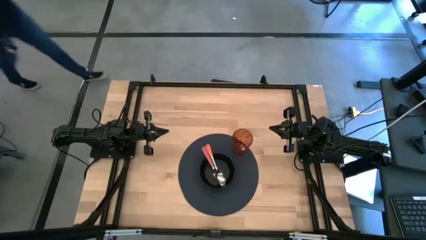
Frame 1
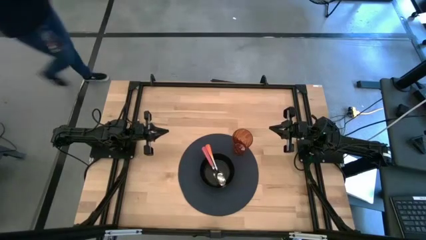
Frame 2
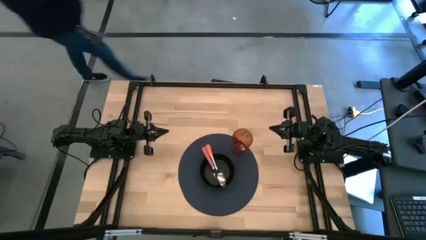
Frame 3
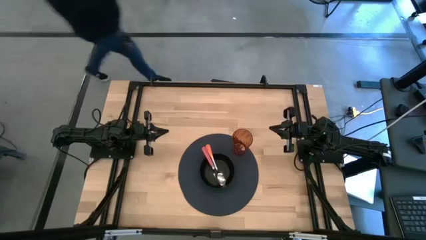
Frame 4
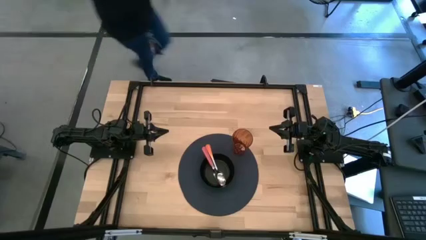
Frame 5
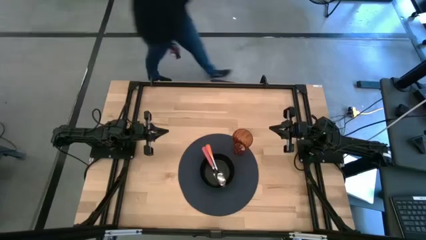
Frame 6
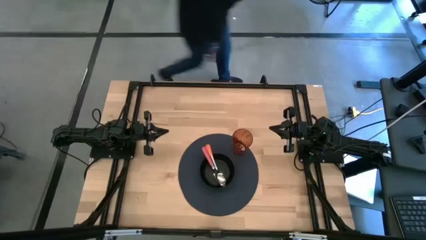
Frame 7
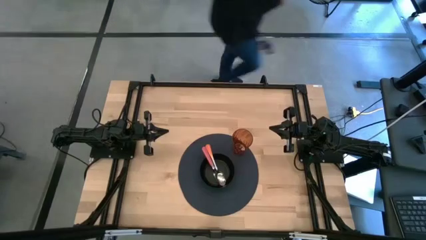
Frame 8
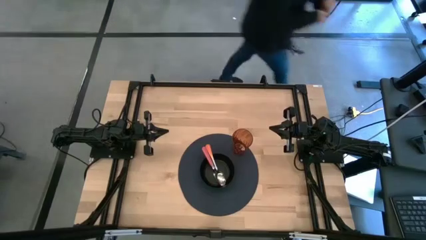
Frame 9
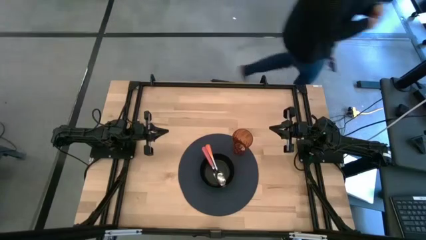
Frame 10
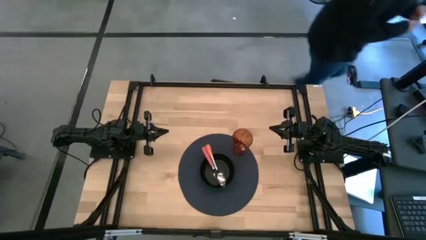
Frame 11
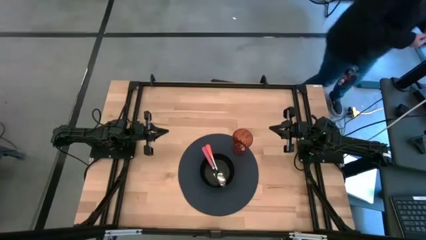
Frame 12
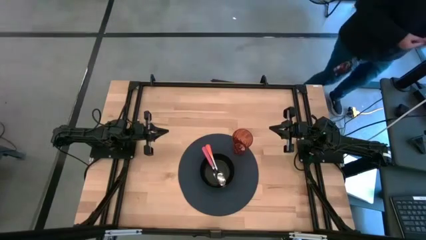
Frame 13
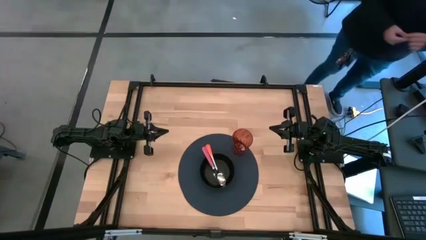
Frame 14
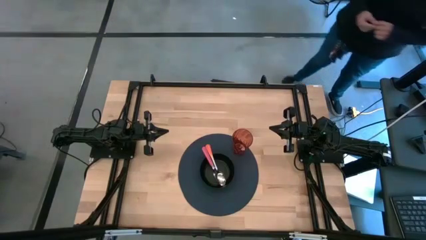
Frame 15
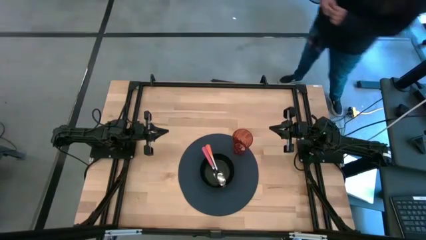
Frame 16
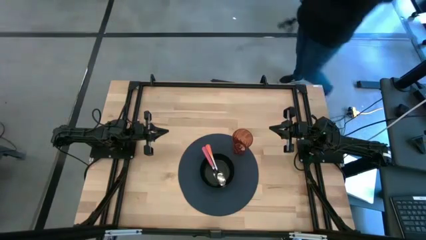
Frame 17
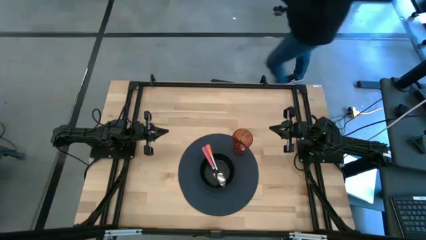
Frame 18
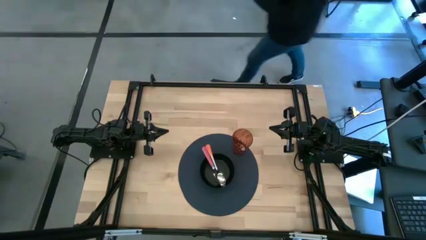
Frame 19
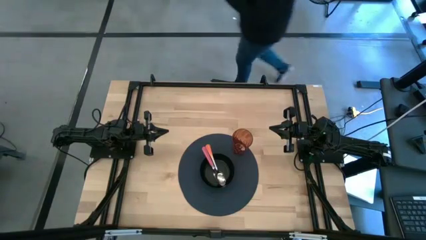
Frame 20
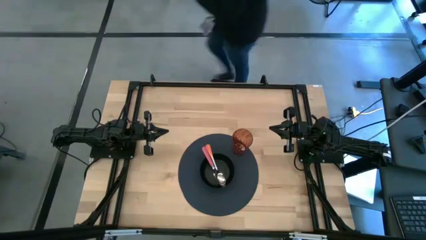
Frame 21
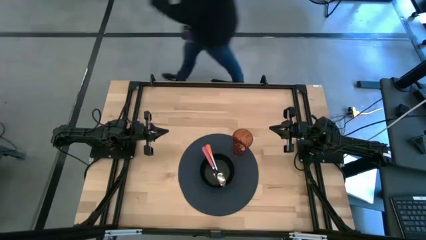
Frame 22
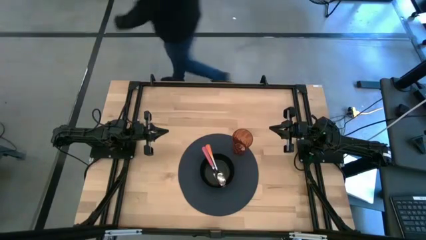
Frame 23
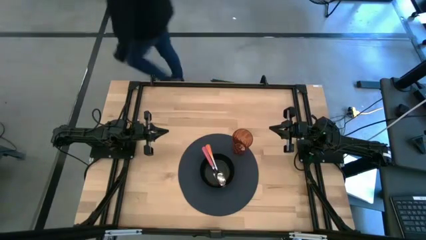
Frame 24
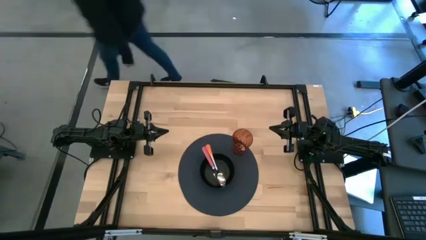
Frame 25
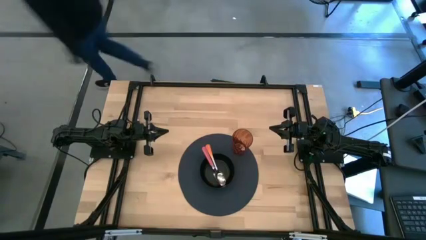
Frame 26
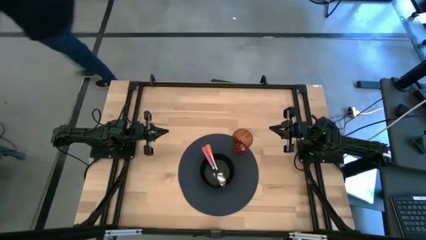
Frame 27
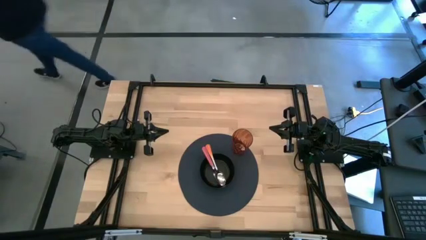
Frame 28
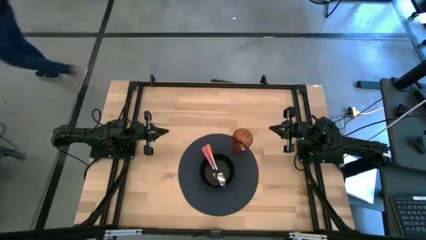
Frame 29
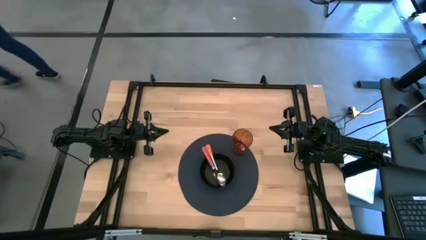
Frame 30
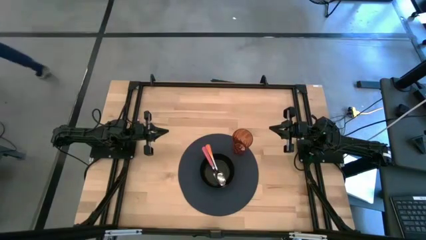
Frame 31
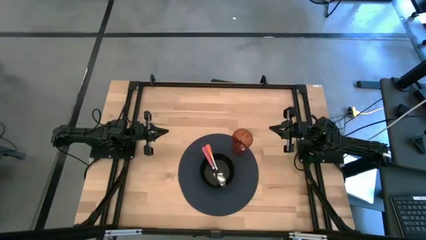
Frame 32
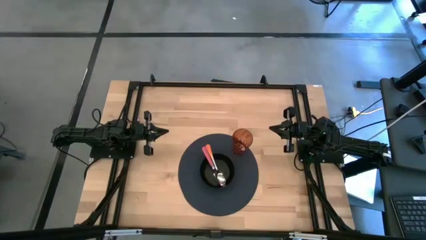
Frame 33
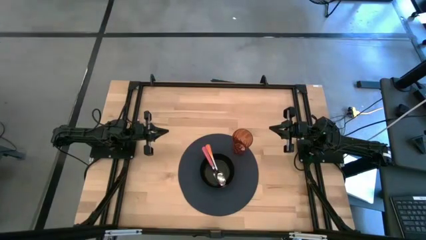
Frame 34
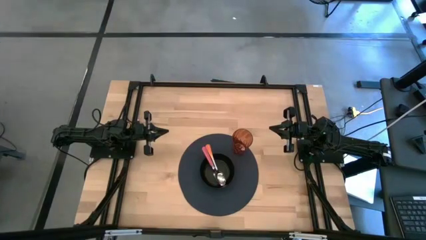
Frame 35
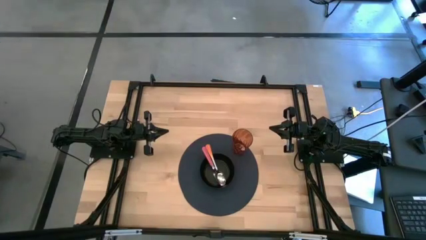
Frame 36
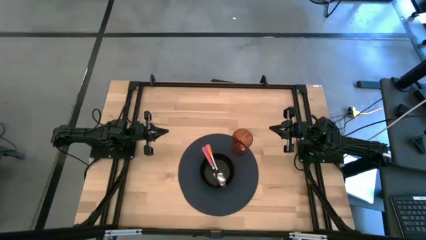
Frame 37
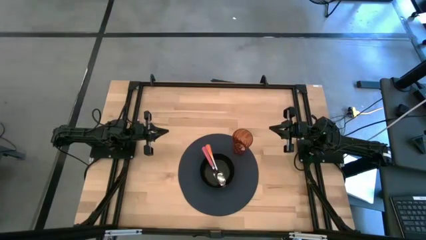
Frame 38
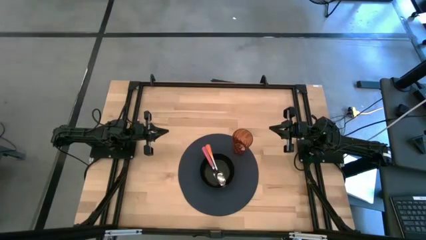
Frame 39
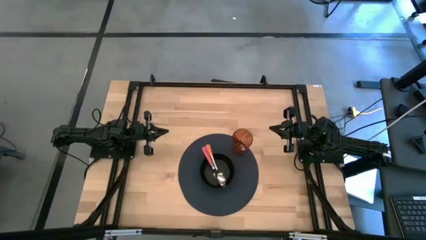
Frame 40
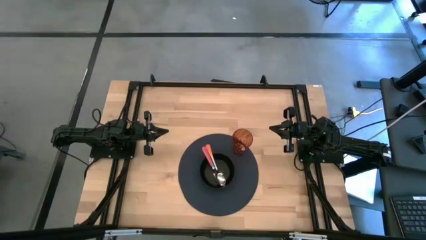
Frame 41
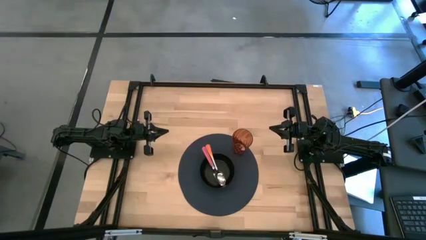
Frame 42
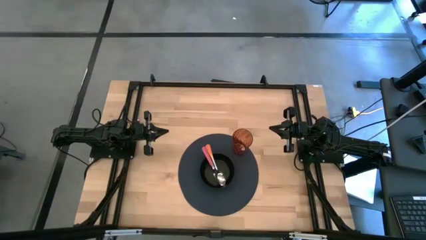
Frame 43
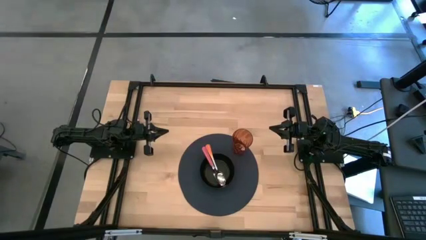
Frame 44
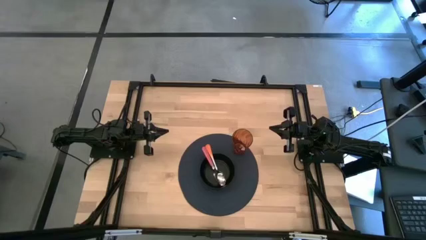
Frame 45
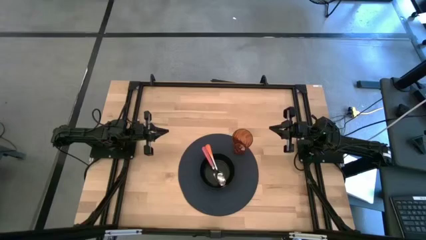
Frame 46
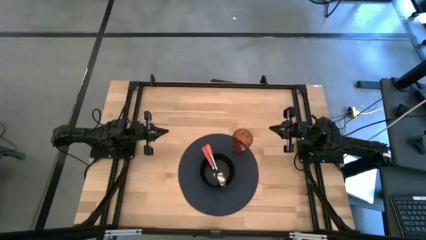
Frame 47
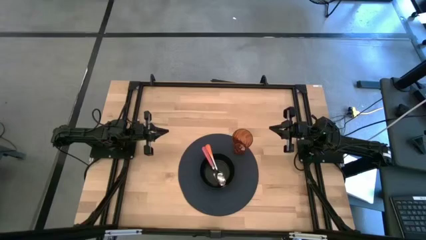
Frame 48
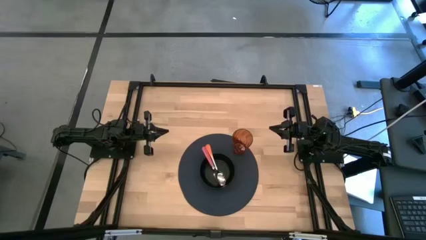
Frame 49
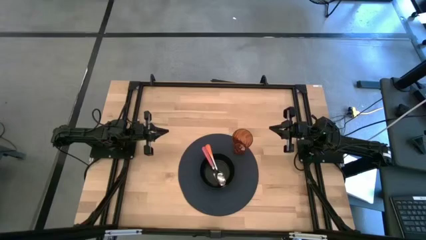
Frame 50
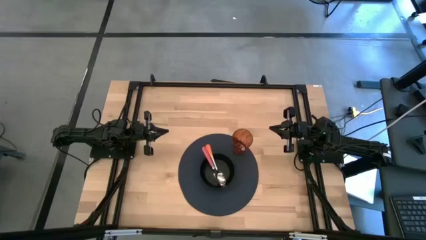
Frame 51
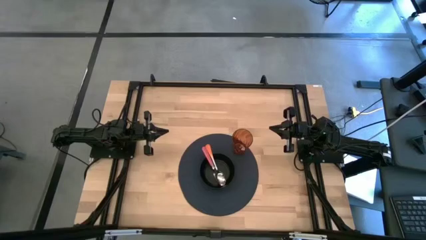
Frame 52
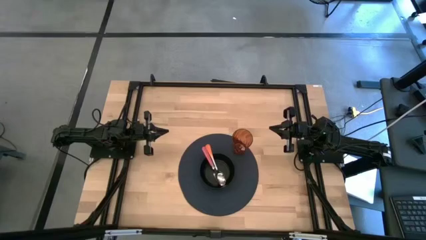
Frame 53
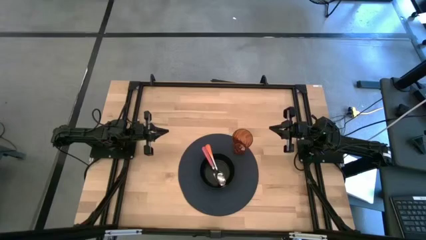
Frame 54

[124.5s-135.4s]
Task: Pick & Place Utensil
Return to Home Position
